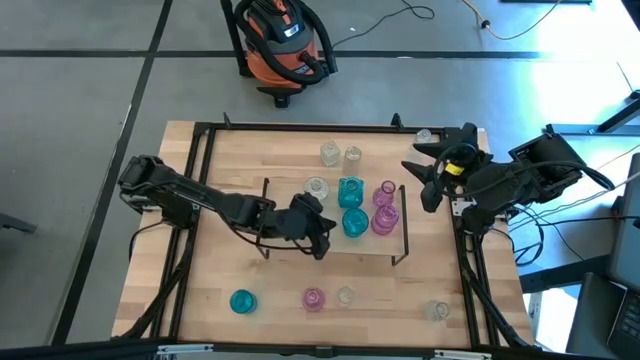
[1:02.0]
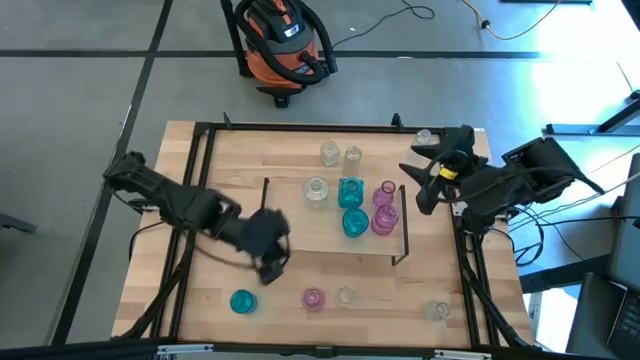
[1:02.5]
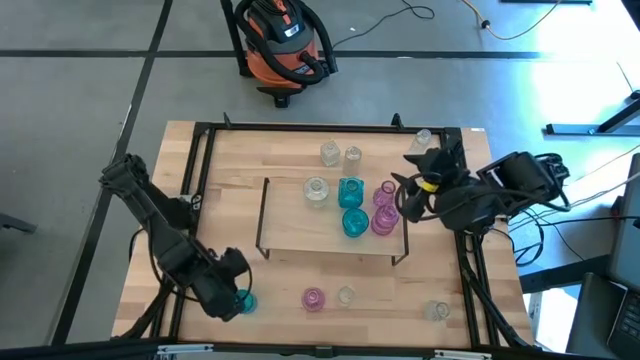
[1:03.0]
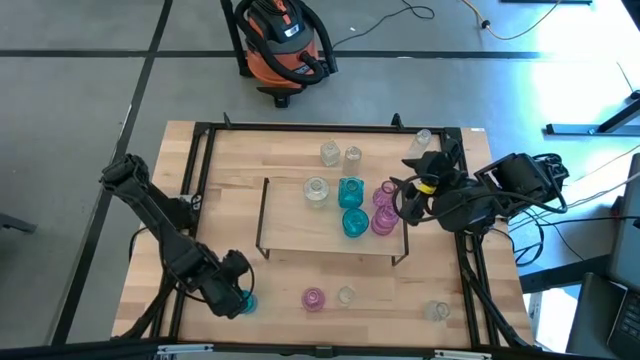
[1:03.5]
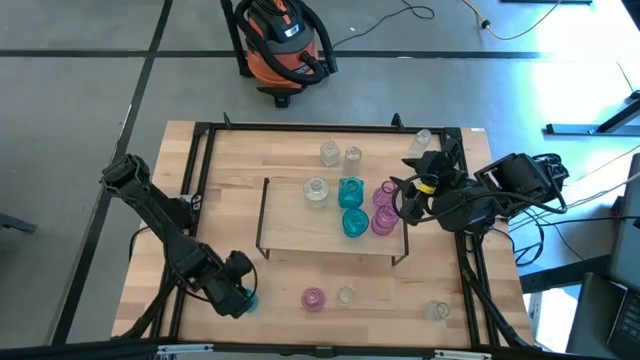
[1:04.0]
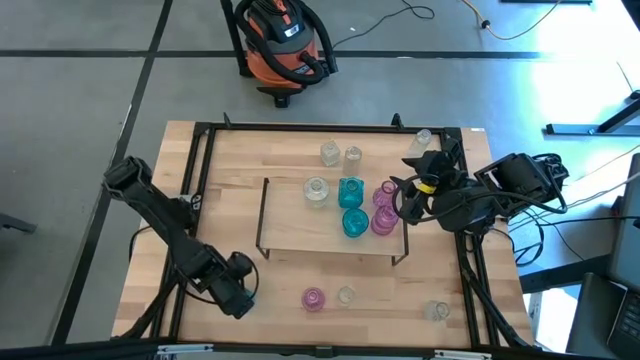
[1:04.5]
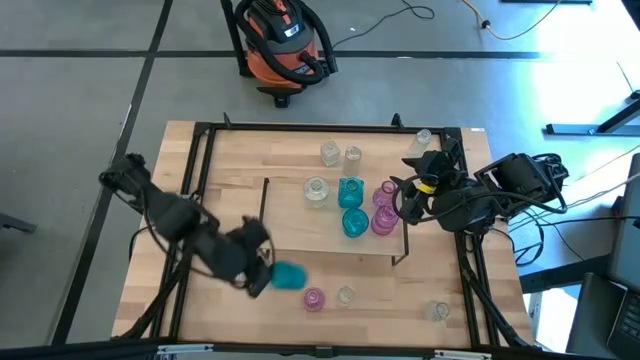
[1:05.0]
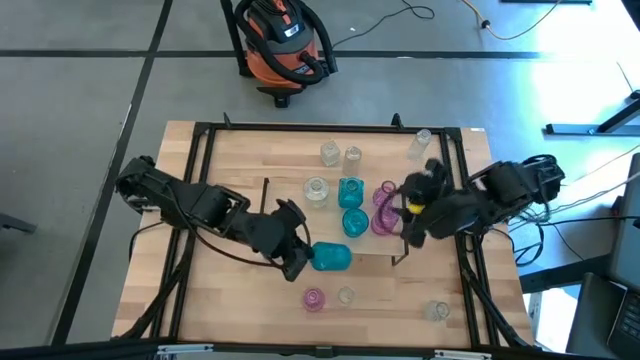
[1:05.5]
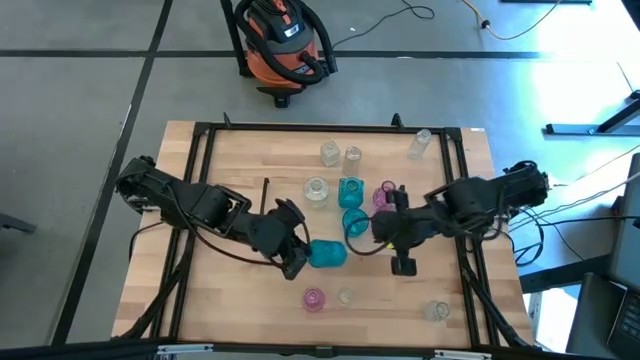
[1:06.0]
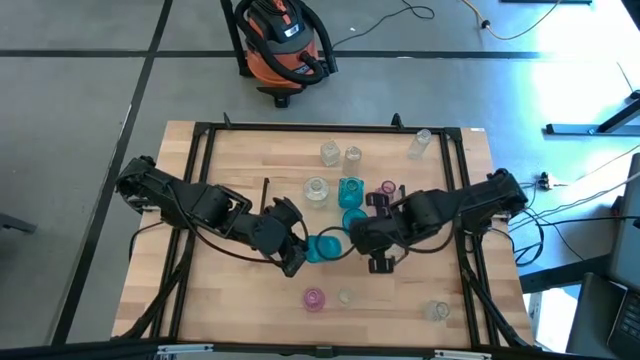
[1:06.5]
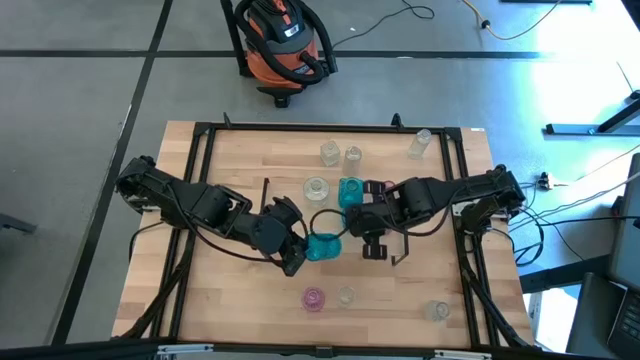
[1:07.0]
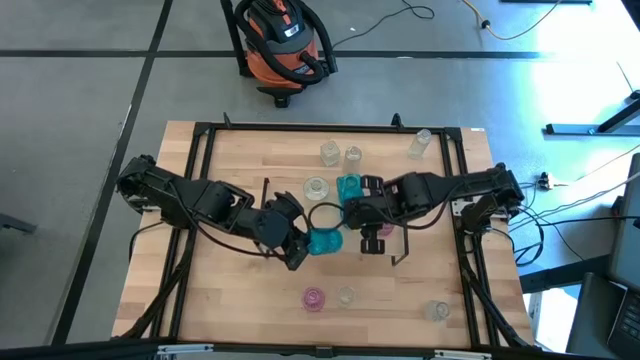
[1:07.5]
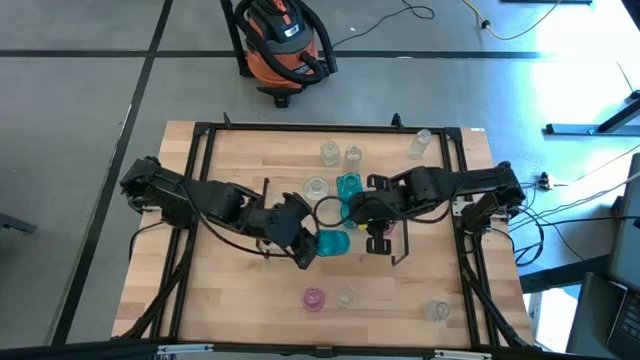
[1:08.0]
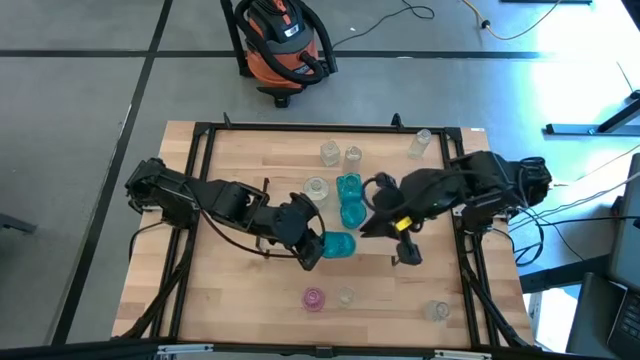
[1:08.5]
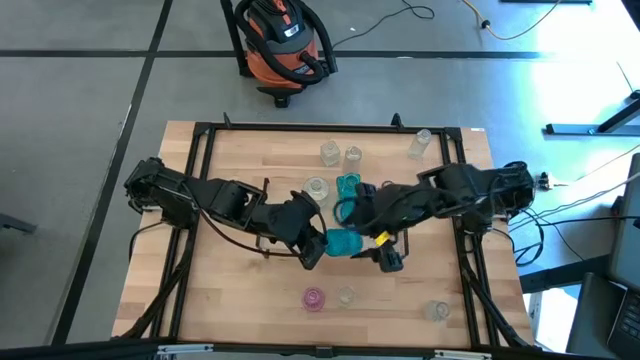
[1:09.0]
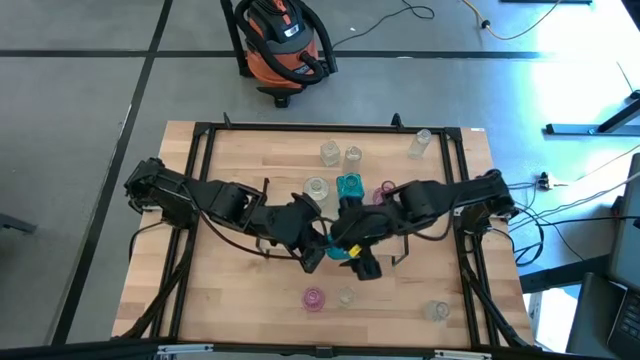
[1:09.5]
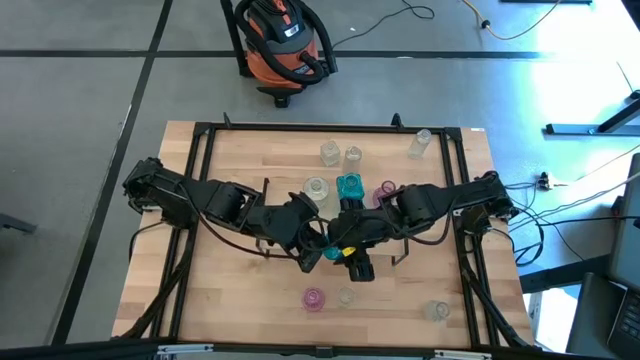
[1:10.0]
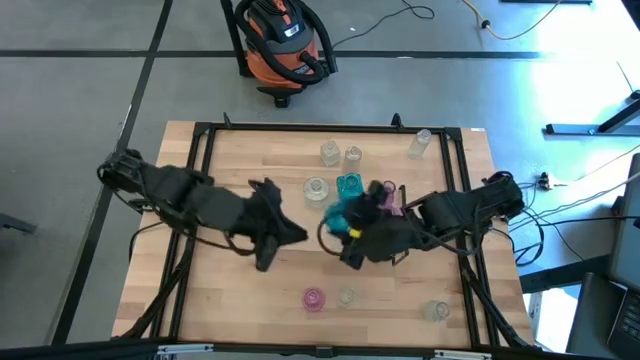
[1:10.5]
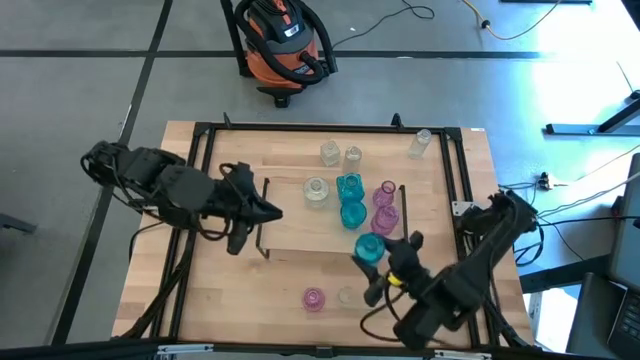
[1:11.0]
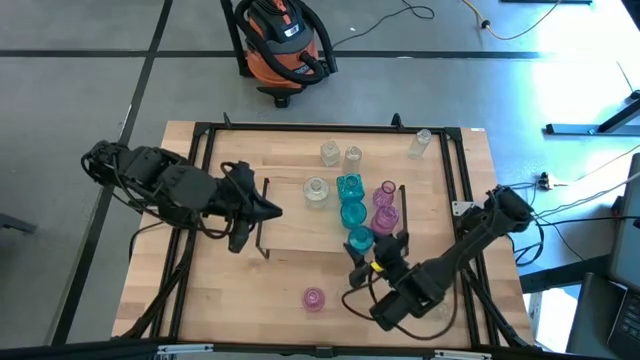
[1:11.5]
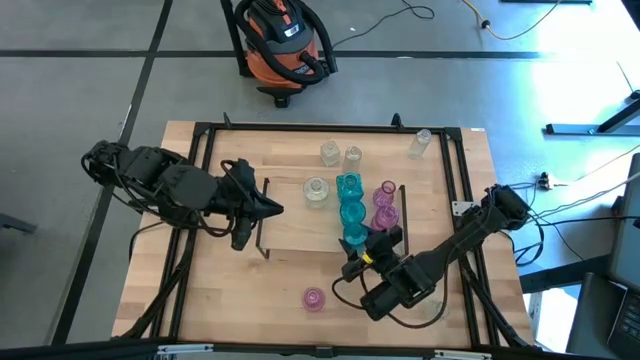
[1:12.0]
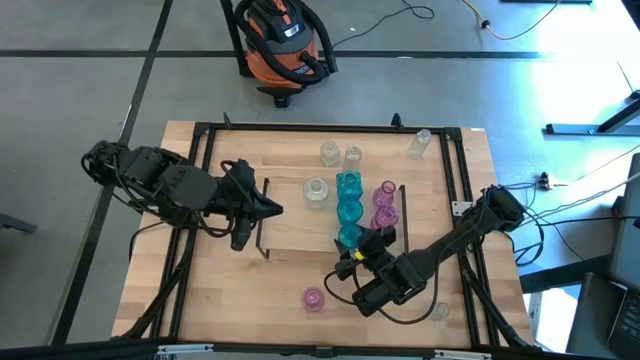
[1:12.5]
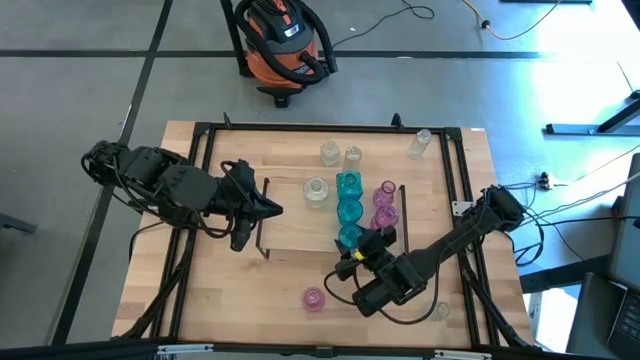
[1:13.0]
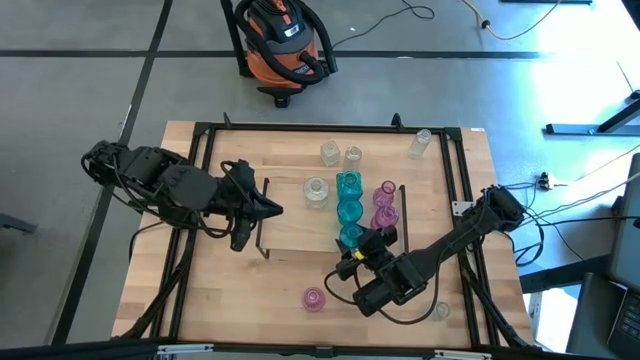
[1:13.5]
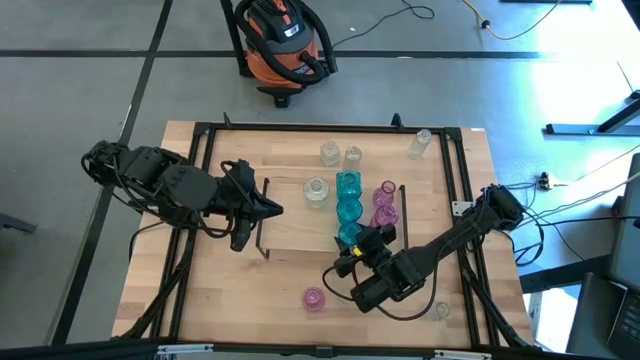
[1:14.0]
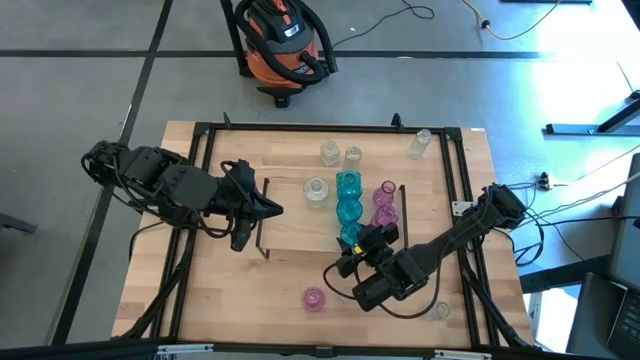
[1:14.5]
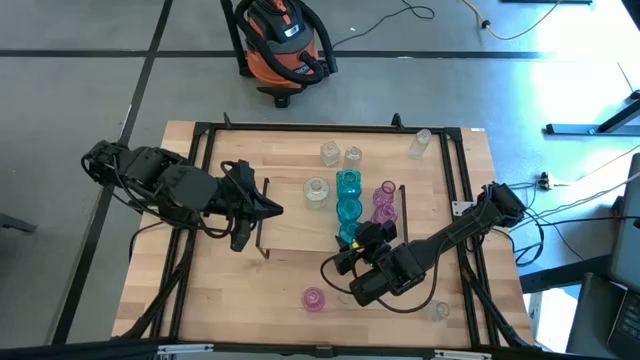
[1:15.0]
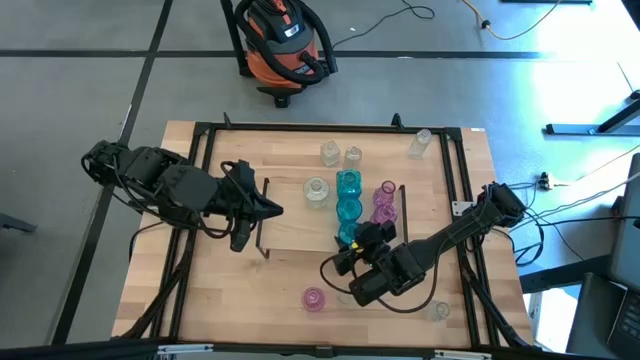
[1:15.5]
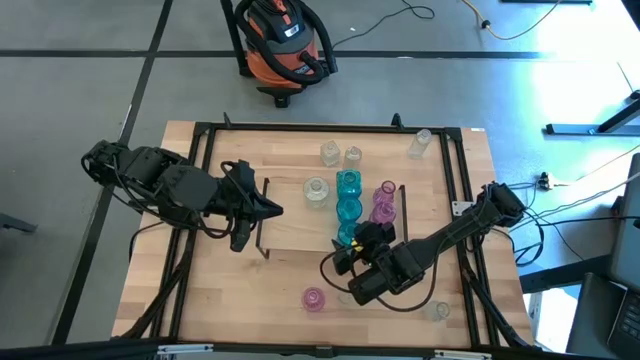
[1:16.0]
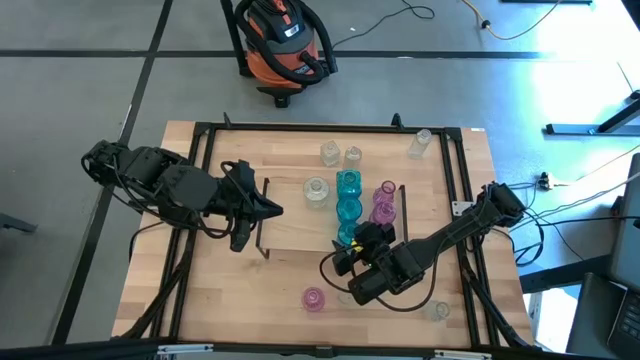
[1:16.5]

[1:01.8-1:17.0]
Task: sort vases onto shelf
Put the blue vase on the shelf

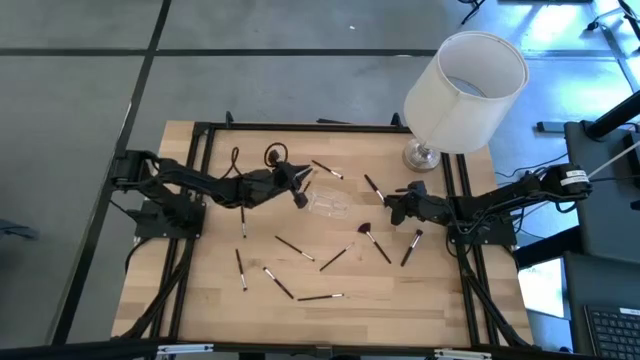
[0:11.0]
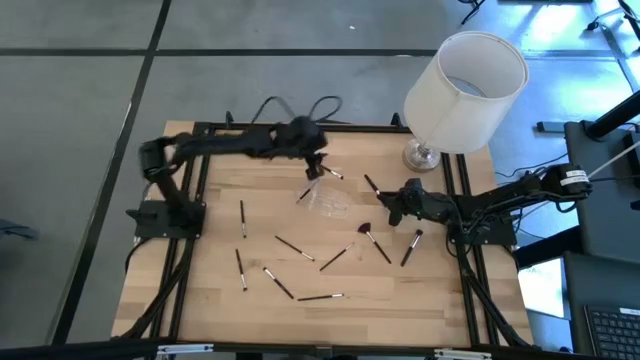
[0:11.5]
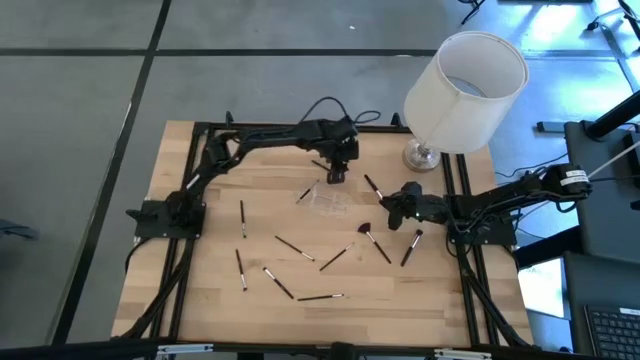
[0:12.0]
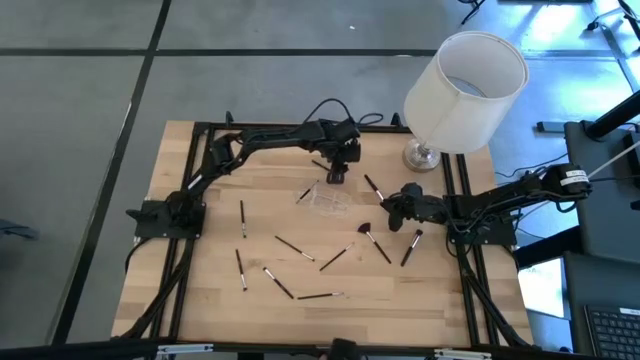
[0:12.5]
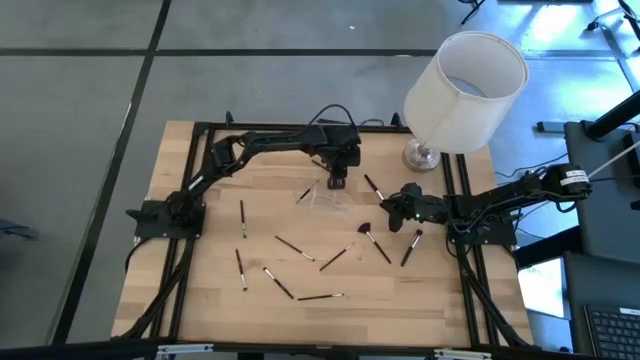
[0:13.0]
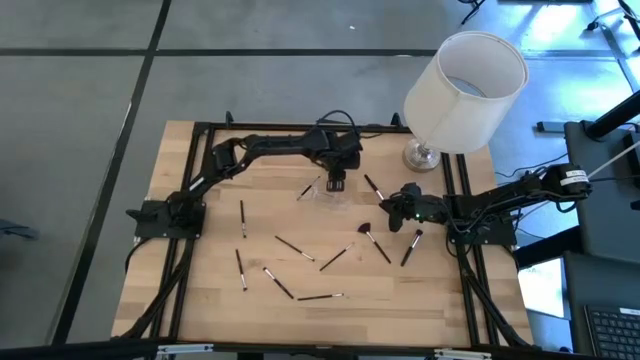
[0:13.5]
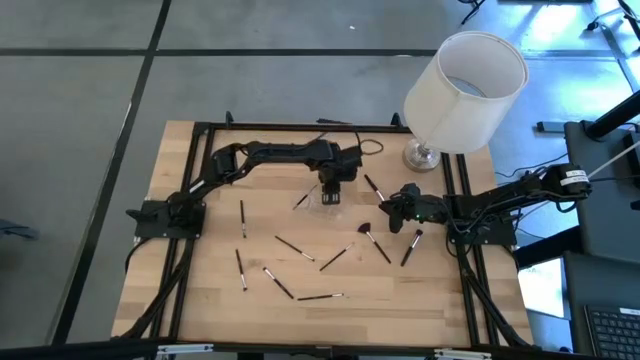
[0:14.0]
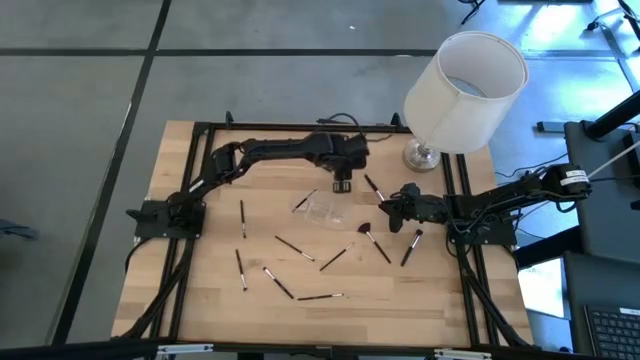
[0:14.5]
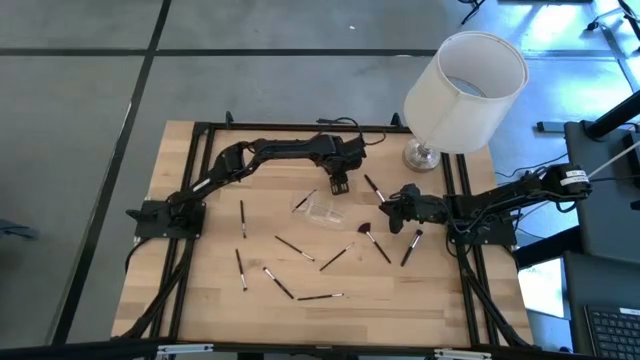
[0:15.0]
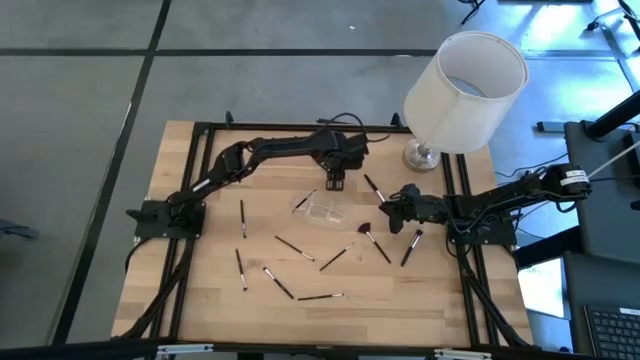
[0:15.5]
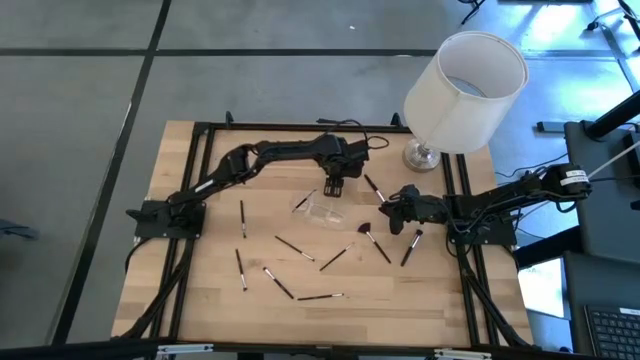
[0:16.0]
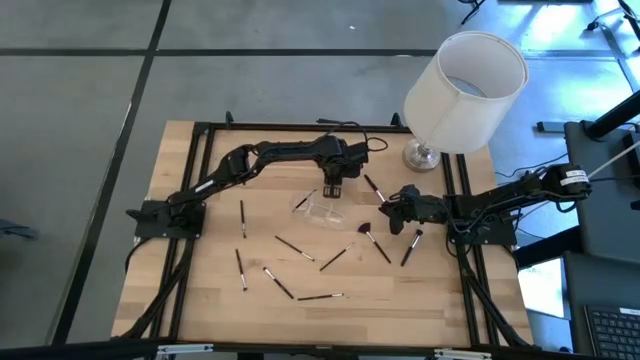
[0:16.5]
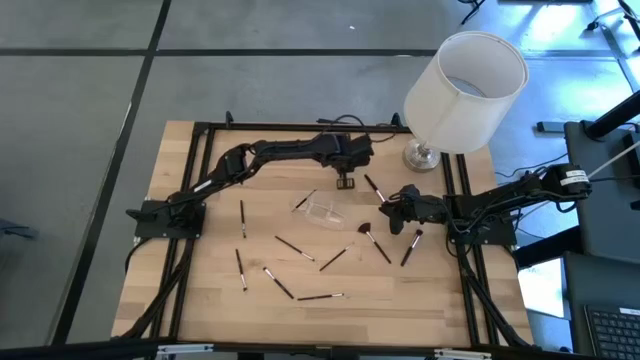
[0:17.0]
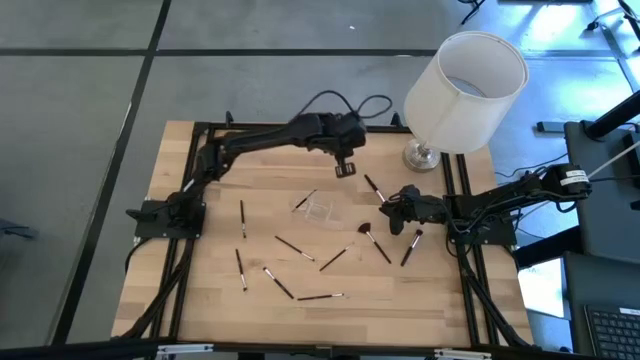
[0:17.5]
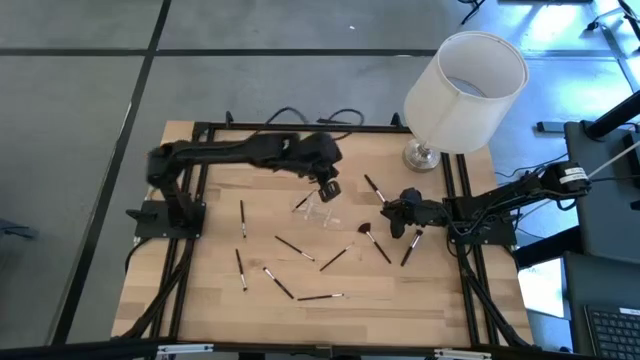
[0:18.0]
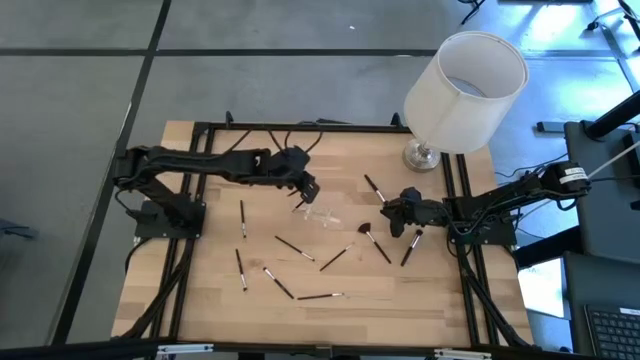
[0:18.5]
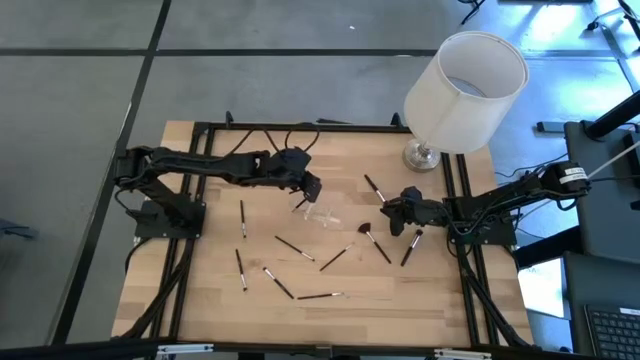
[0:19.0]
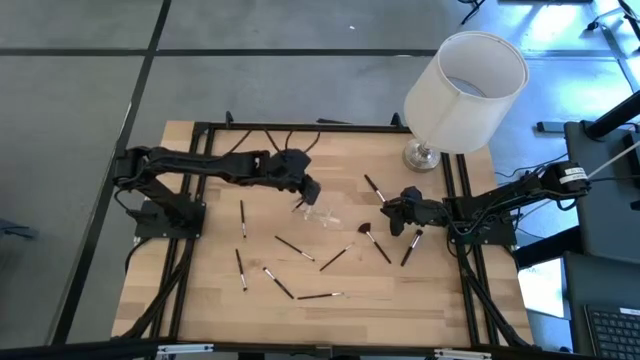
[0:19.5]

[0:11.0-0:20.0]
Task: Put items in baskets/containers
Put the eyeshadow brush into the transparent organizer
